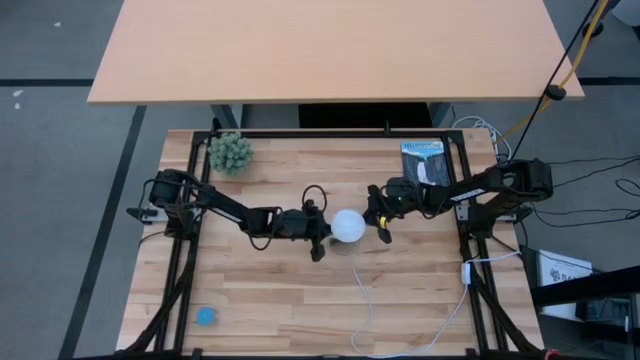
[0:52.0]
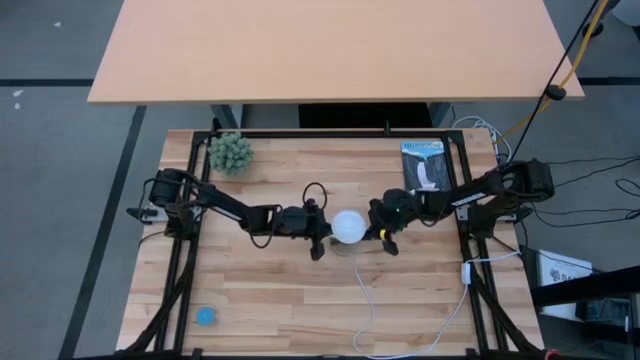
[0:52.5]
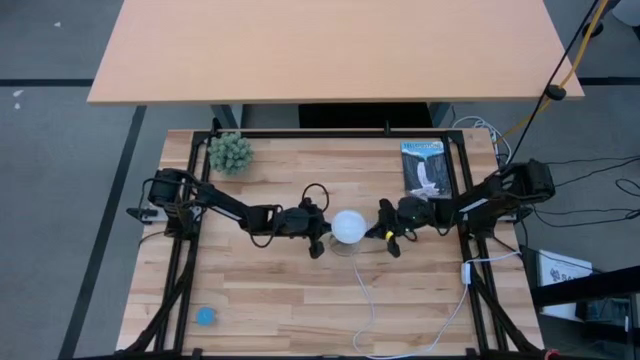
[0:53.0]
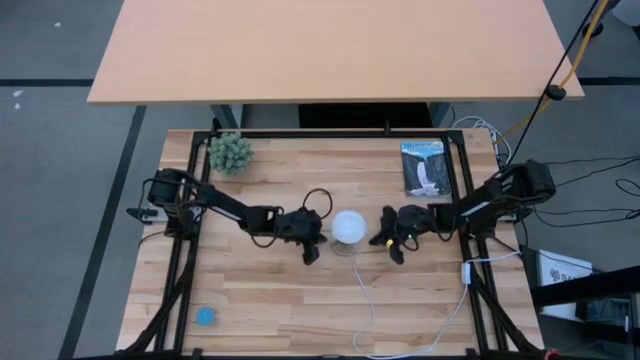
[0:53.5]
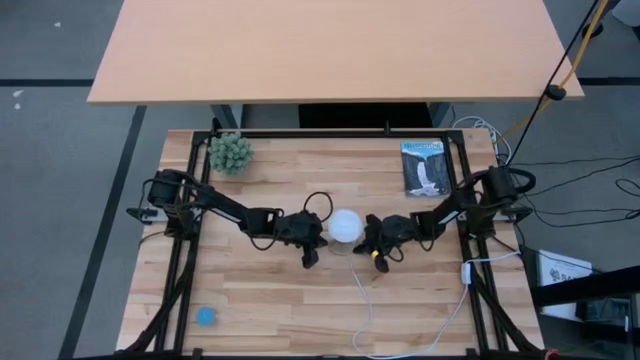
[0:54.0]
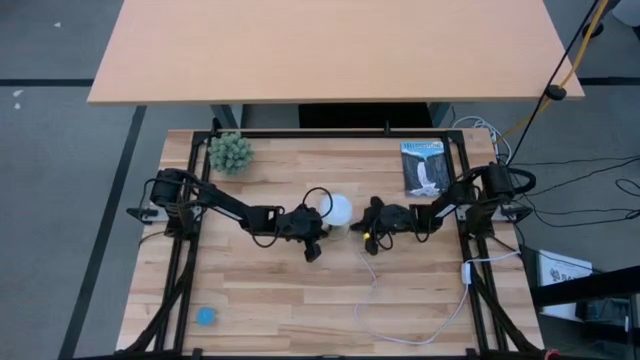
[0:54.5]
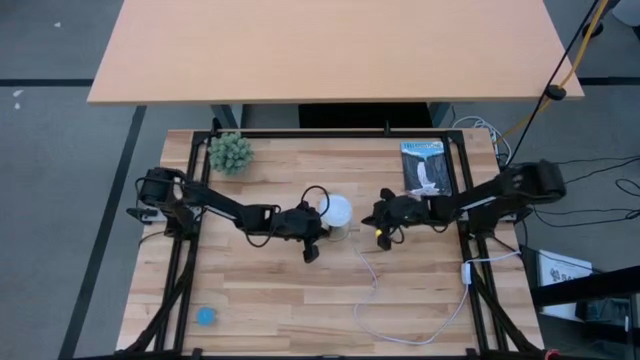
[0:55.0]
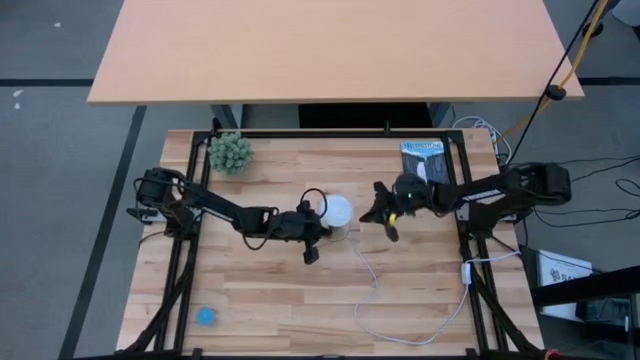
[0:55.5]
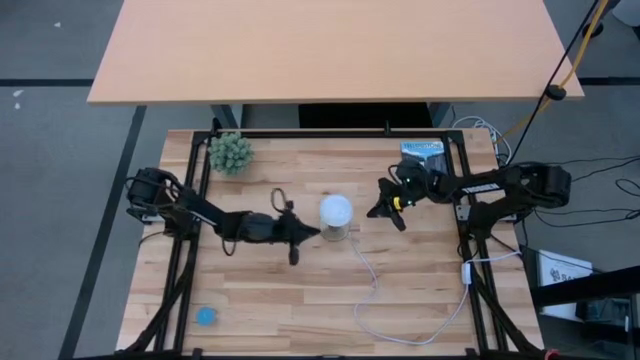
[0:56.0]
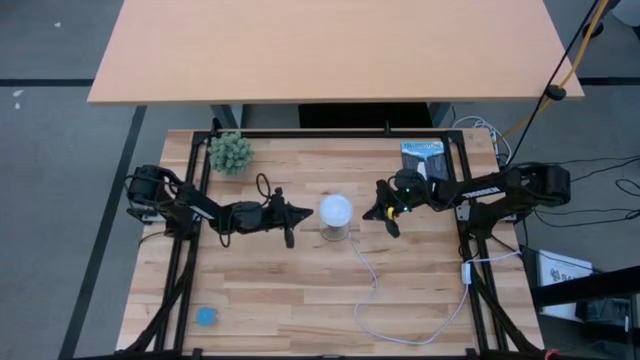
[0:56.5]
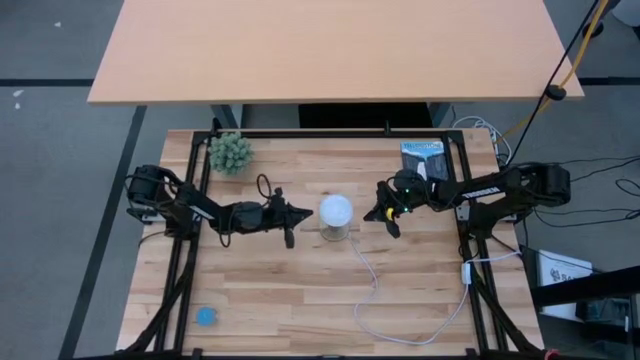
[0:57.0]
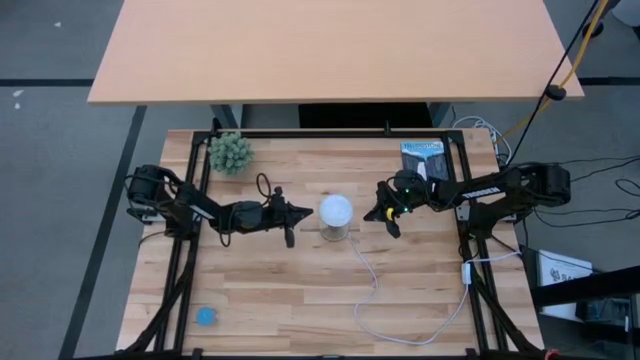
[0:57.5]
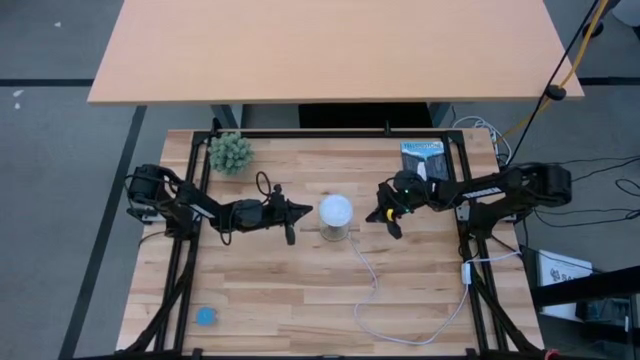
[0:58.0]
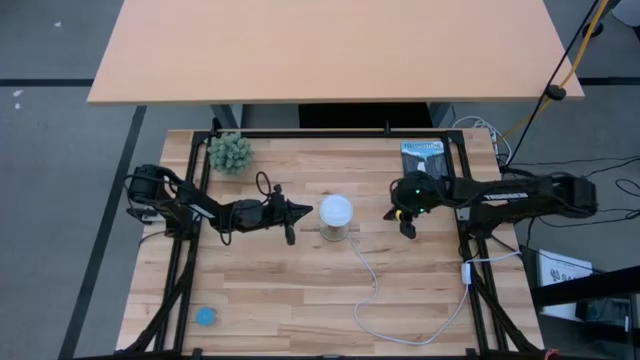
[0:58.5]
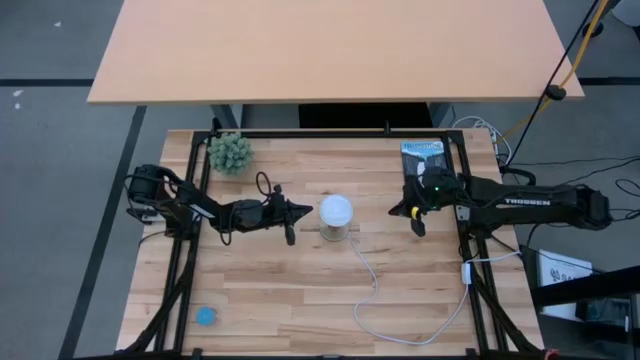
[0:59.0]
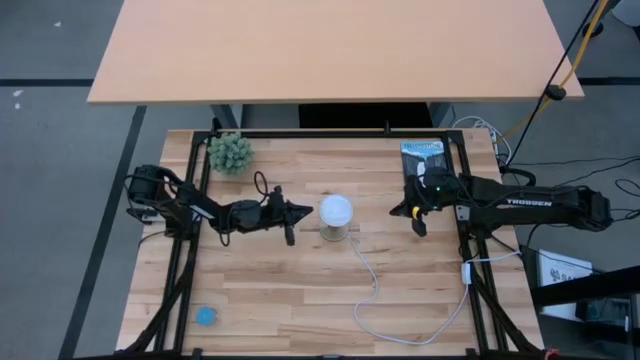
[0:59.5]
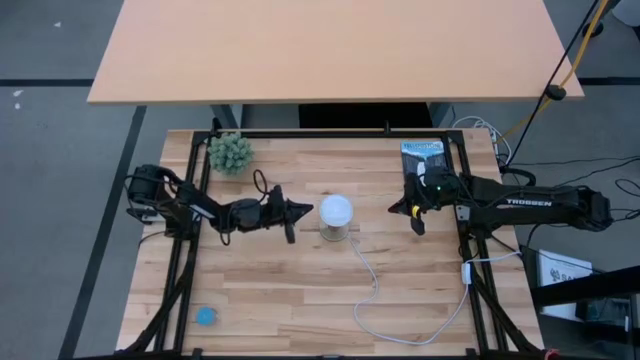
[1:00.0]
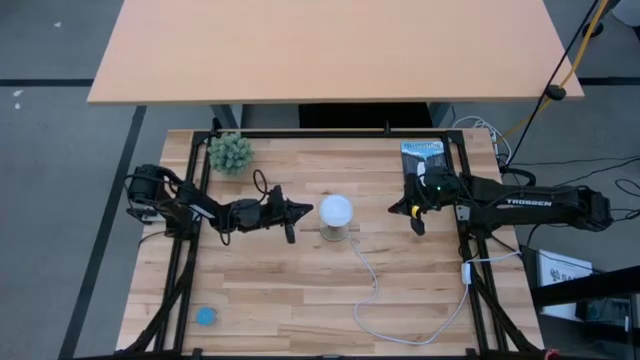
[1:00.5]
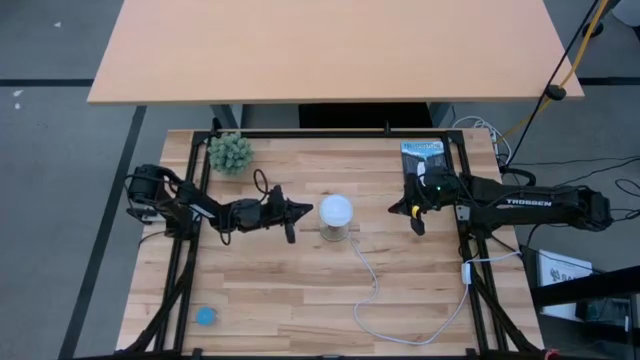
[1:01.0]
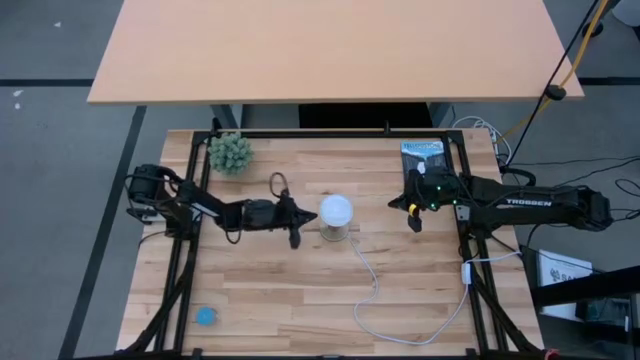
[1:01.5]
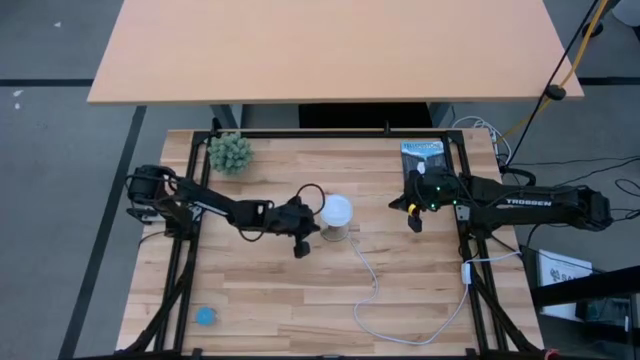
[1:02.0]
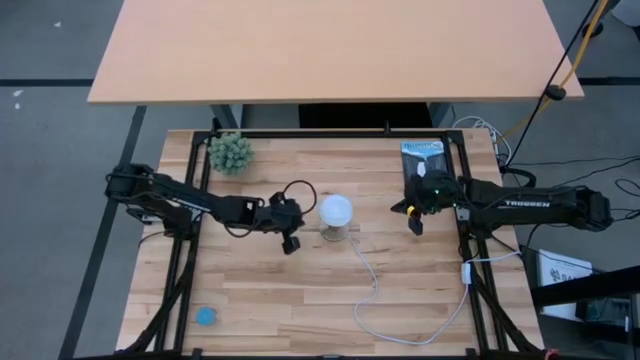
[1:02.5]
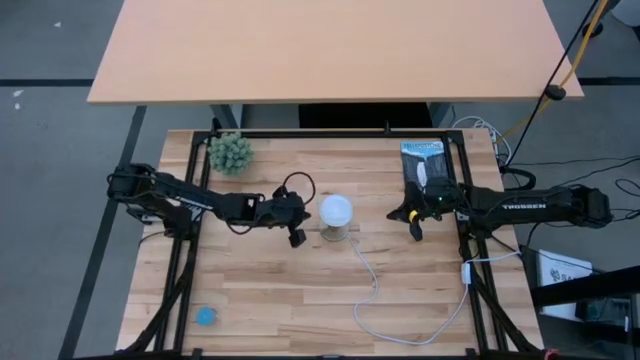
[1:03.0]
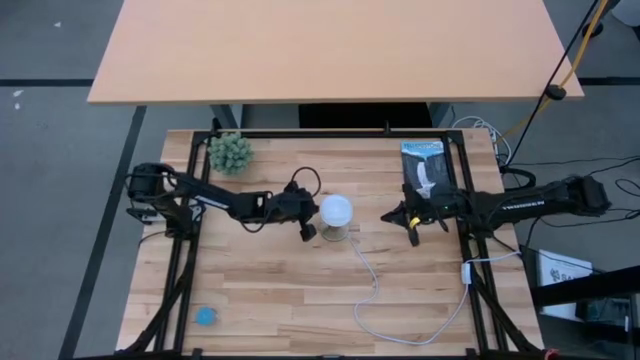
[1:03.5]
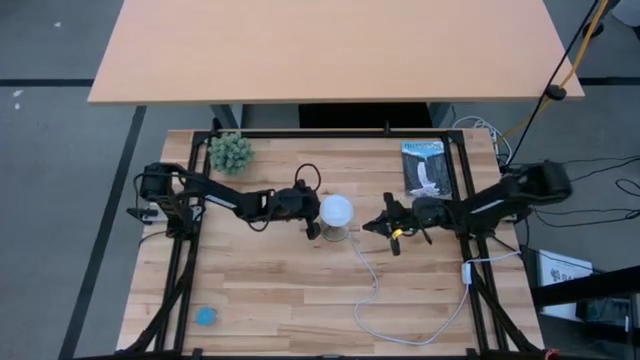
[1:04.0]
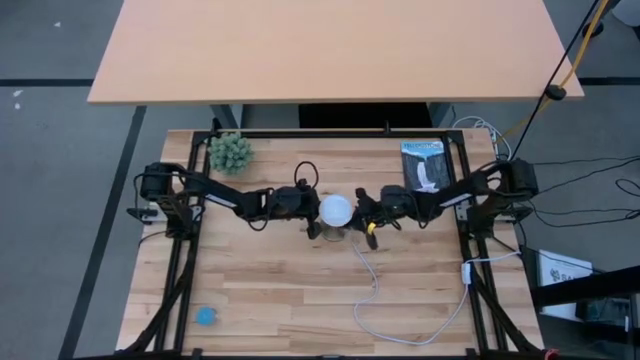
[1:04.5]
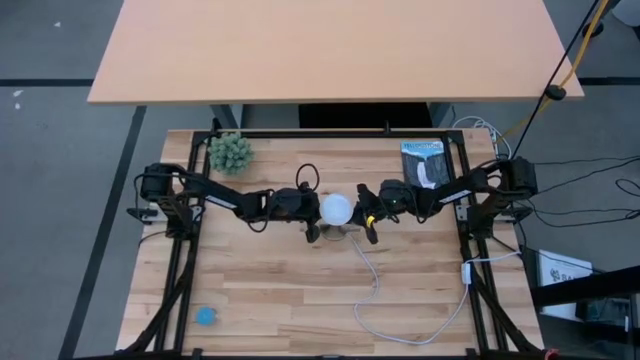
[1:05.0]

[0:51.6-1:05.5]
Task: Screw lightbulb
Remove the lightbulb from the lamp

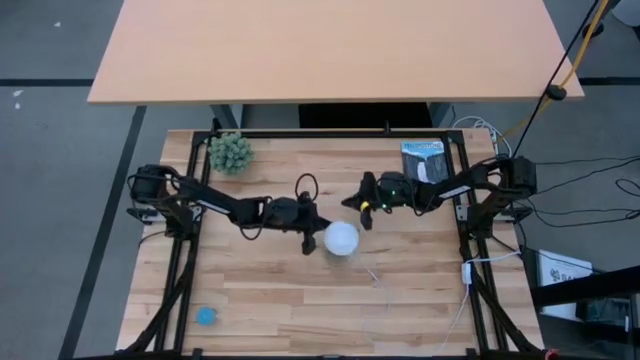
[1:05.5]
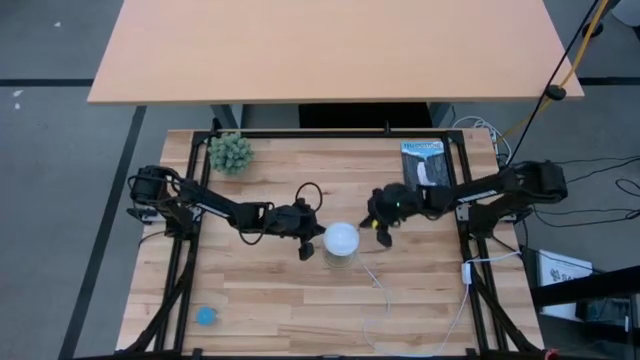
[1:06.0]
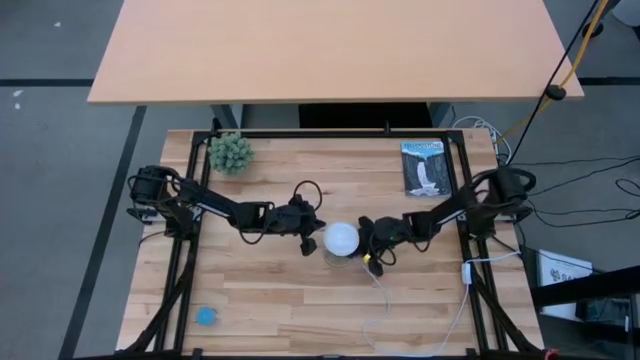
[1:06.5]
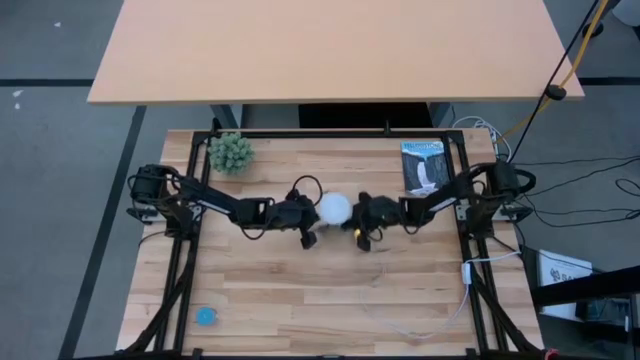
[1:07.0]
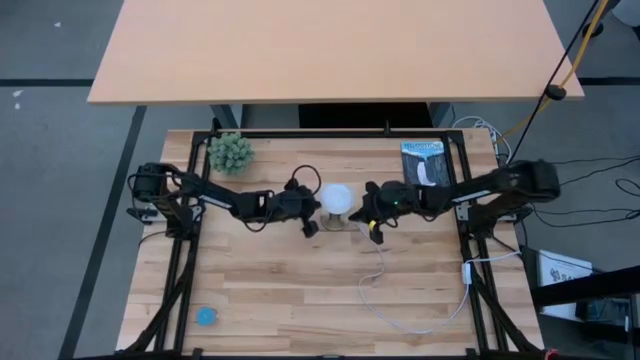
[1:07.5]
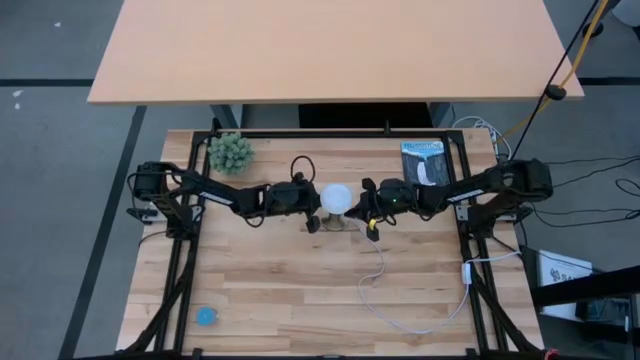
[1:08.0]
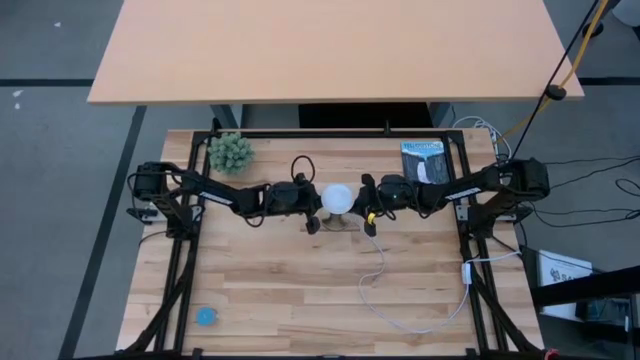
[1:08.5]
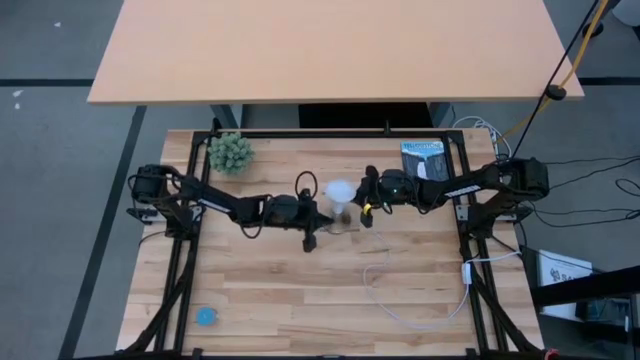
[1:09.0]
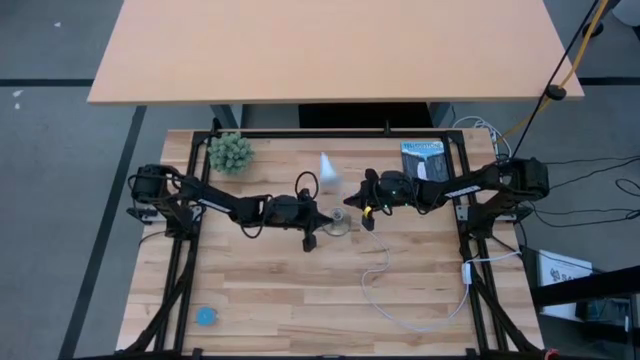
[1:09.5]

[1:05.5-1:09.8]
Remove the lightbulb from the lamp

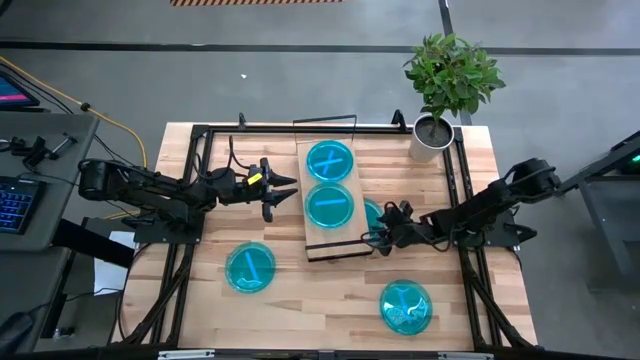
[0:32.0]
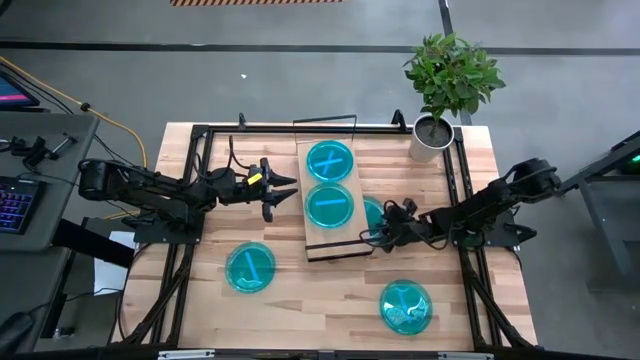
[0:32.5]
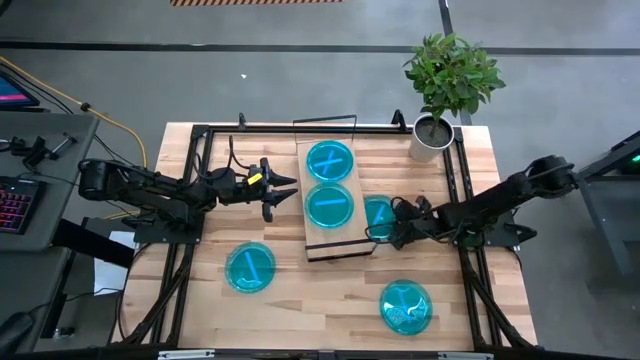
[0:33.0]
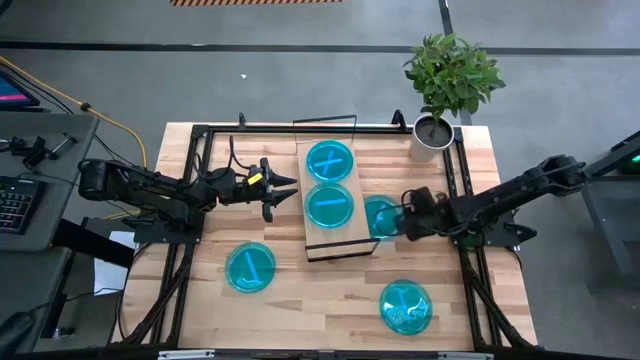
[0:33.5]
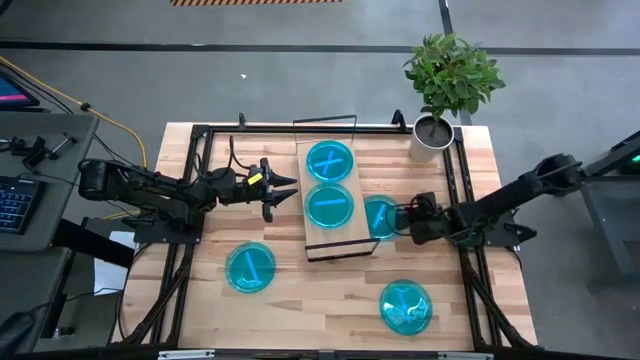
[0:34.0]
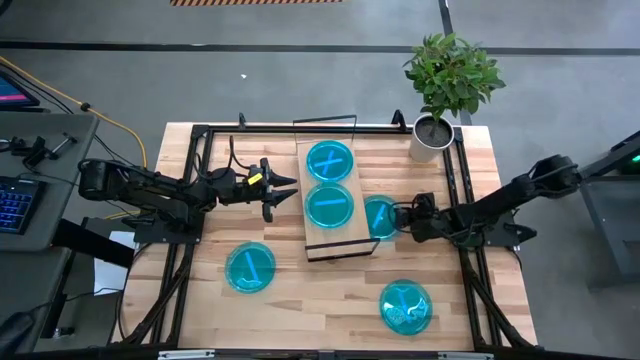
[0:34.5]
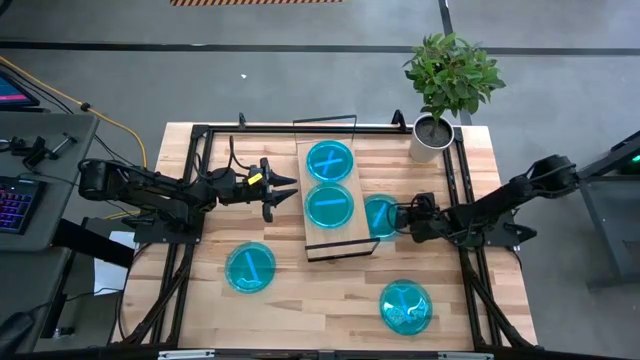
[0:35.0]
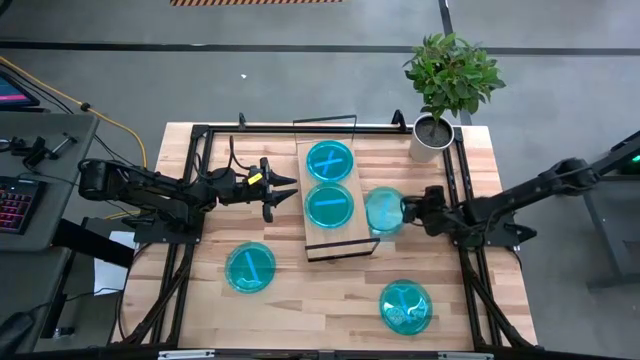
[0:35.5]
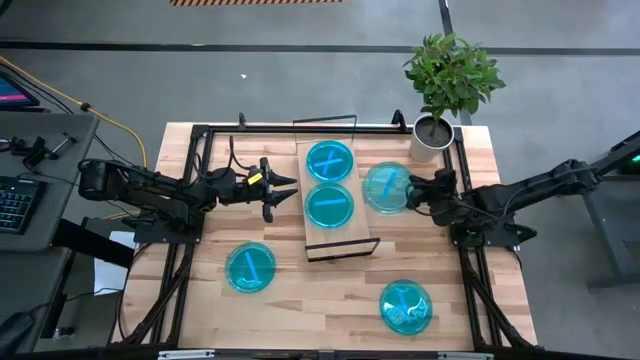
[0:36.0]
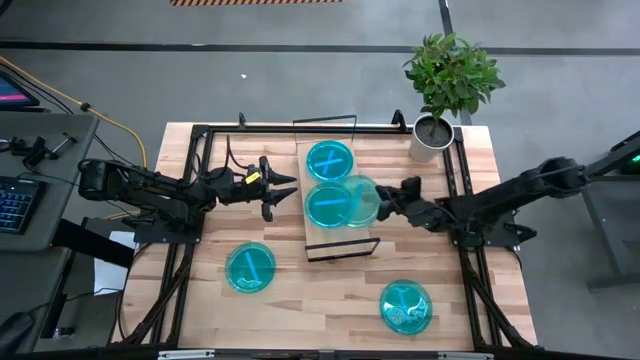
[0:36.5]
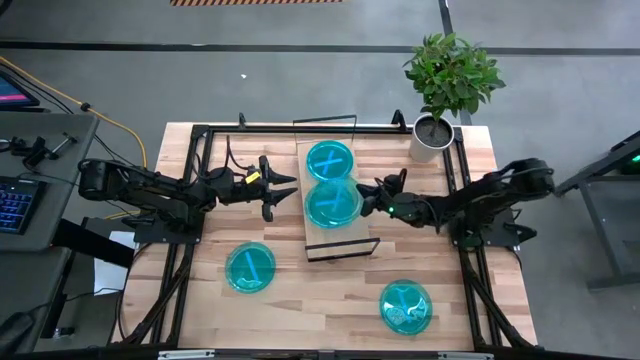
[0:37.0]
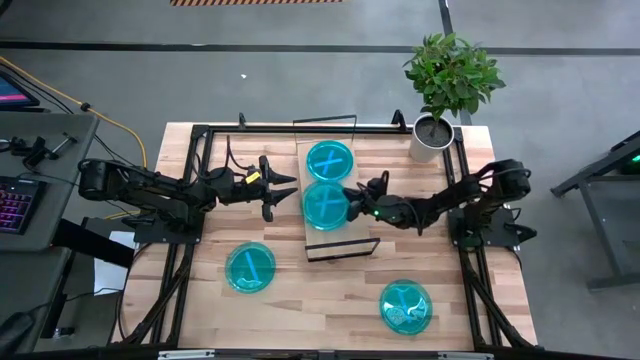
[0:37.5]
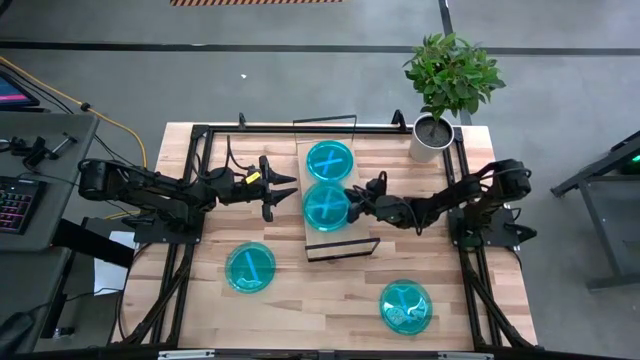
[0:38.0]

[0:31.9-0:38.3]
Task: Place and stack plates onto a shelf
Stack the blue plate on top of the blue plate on the shelf
